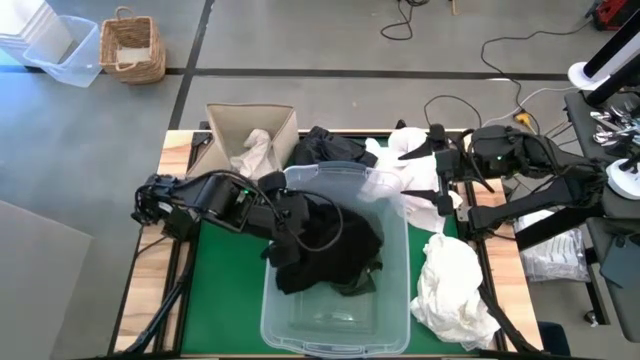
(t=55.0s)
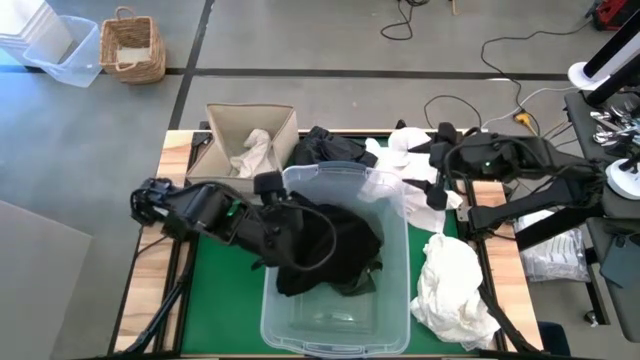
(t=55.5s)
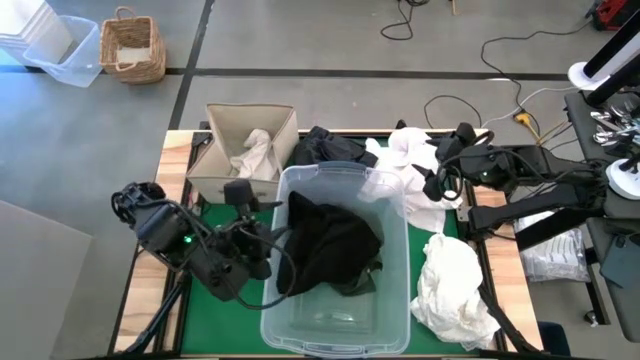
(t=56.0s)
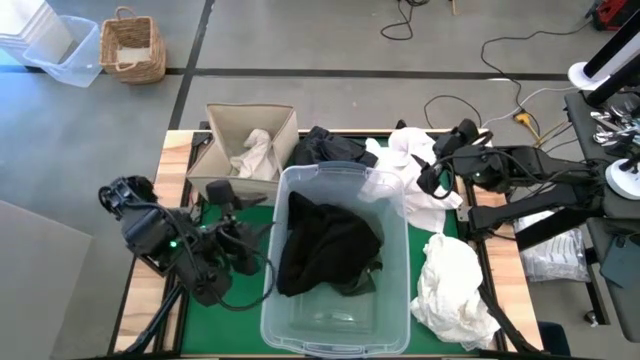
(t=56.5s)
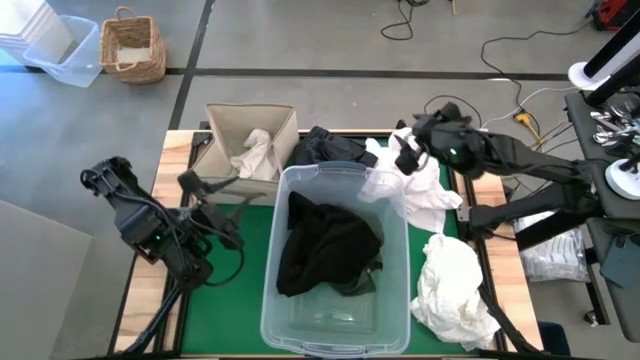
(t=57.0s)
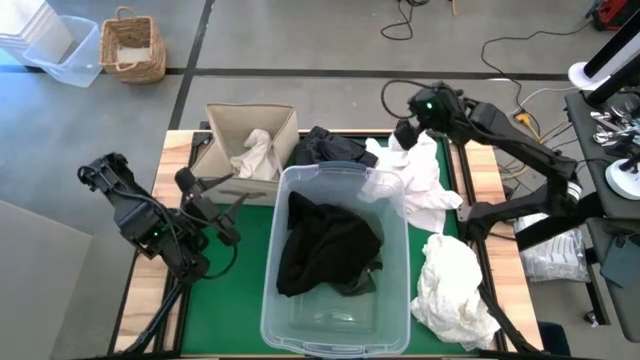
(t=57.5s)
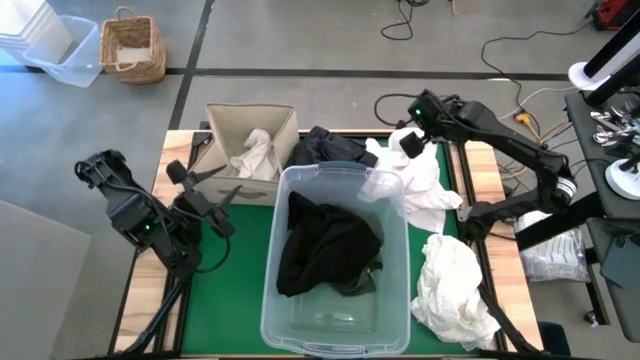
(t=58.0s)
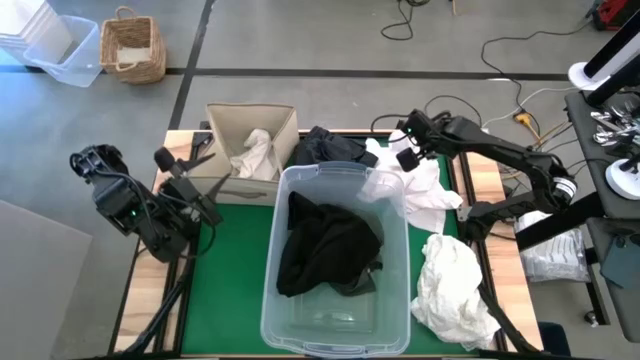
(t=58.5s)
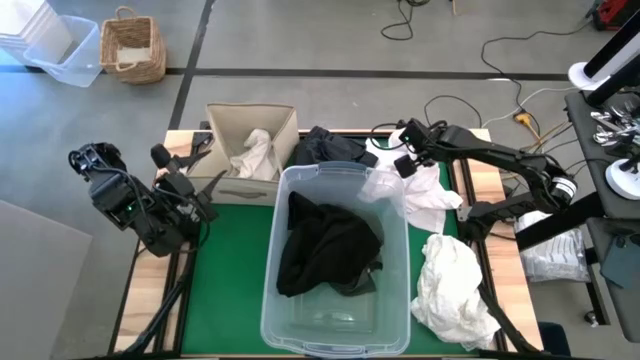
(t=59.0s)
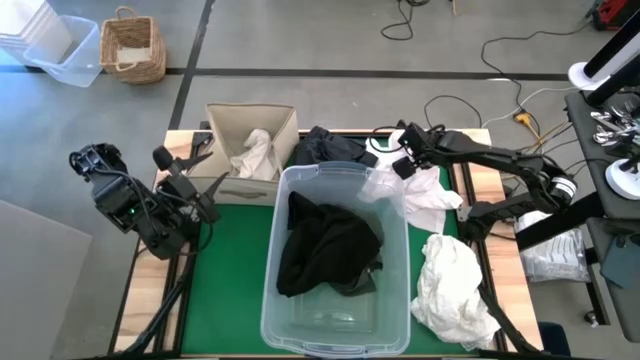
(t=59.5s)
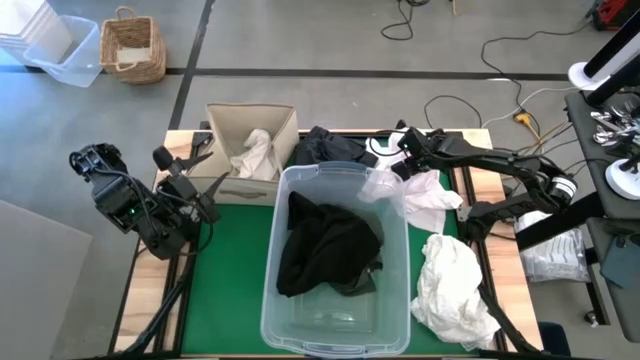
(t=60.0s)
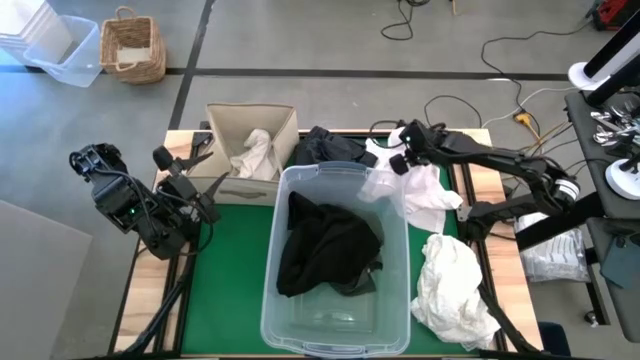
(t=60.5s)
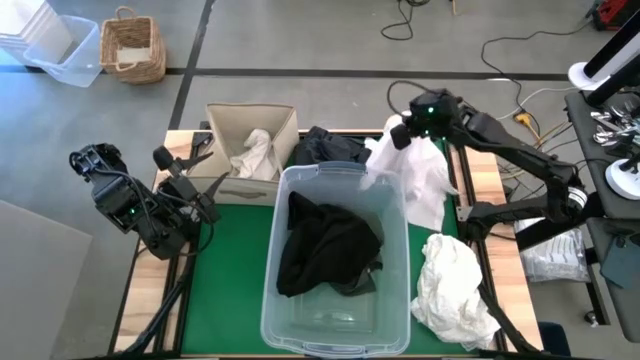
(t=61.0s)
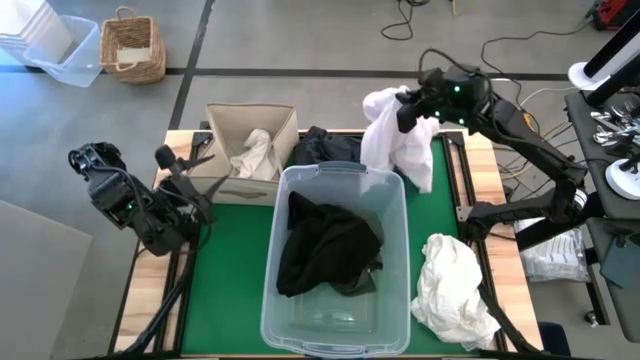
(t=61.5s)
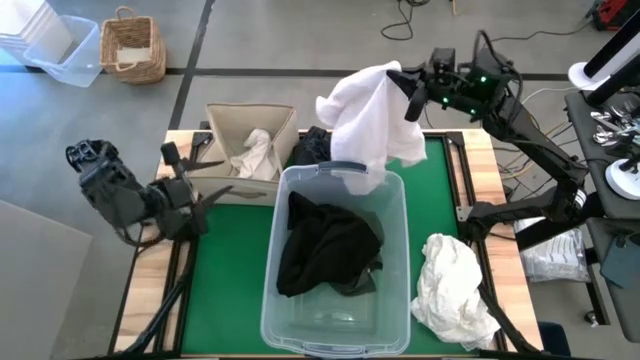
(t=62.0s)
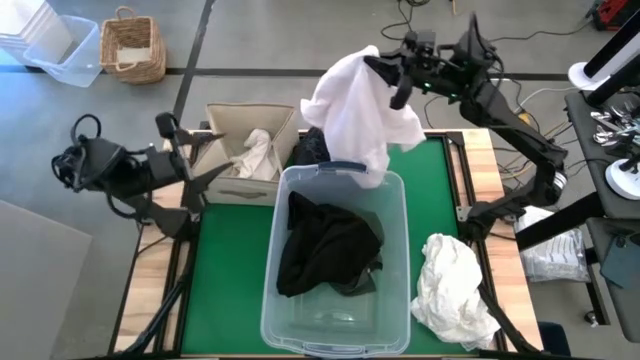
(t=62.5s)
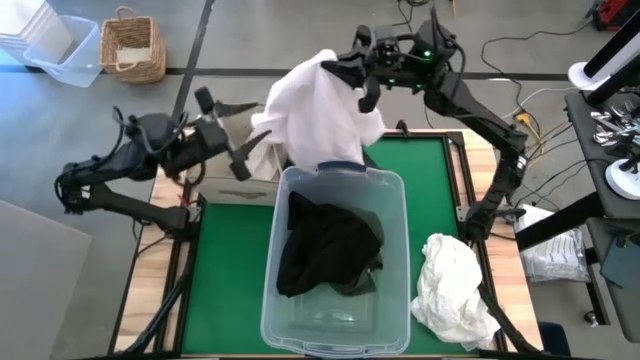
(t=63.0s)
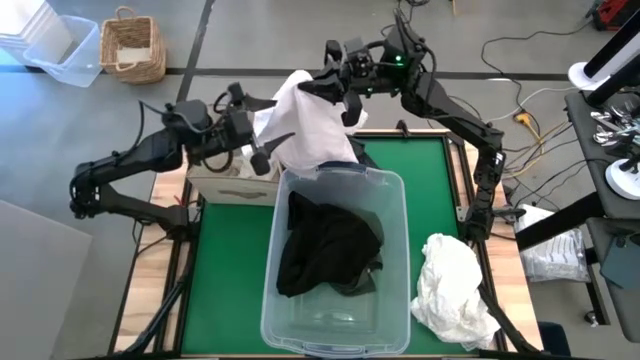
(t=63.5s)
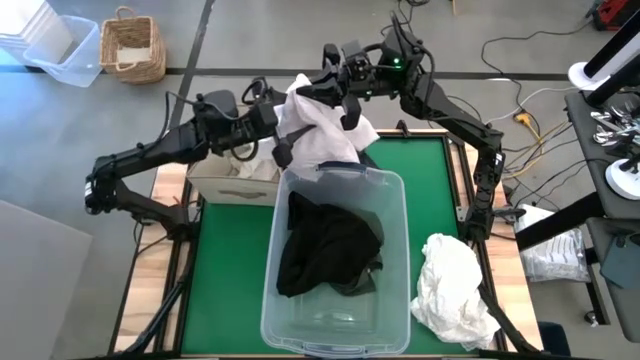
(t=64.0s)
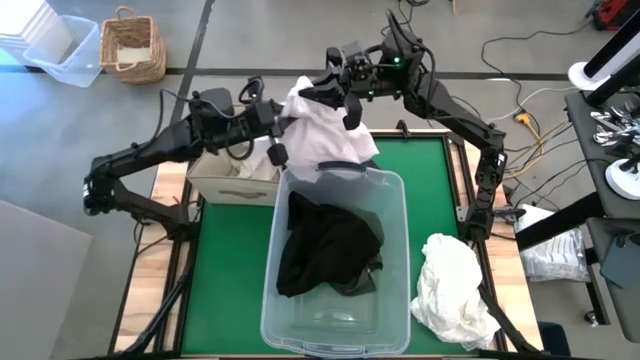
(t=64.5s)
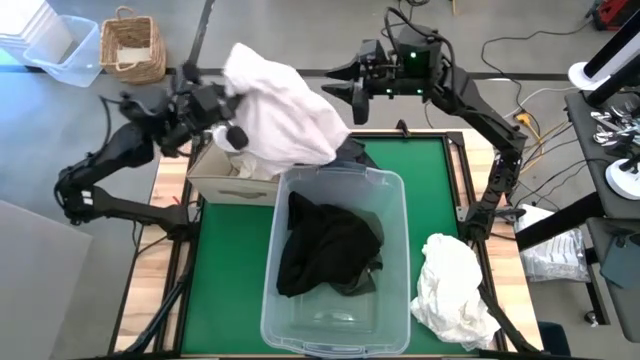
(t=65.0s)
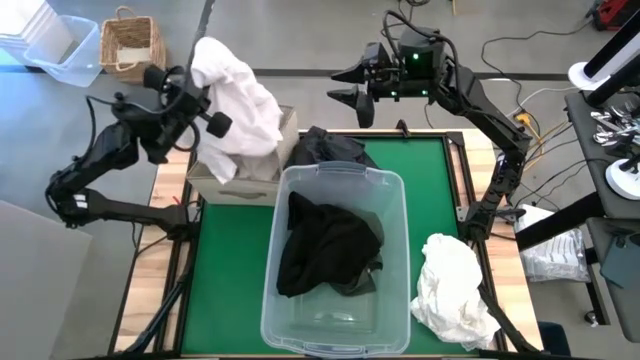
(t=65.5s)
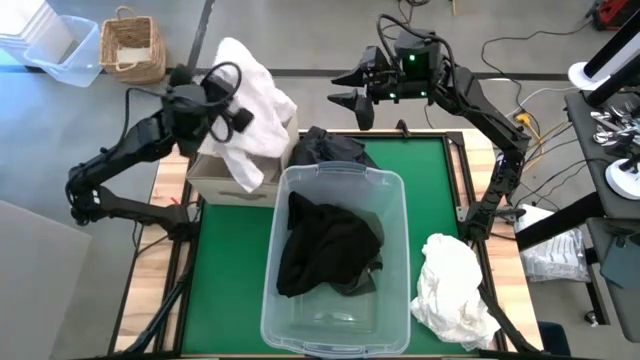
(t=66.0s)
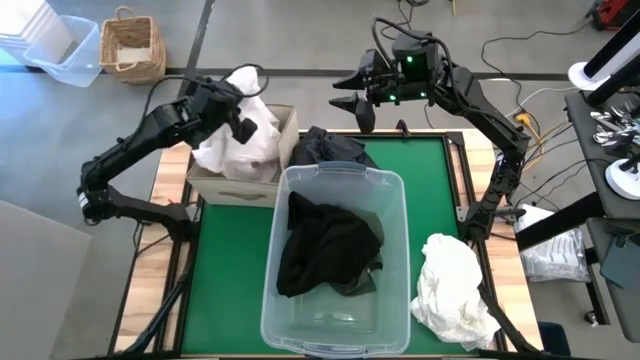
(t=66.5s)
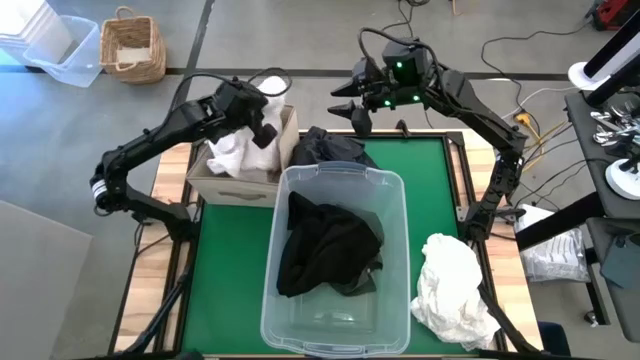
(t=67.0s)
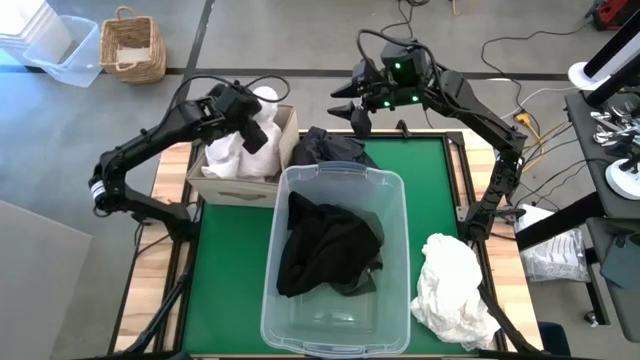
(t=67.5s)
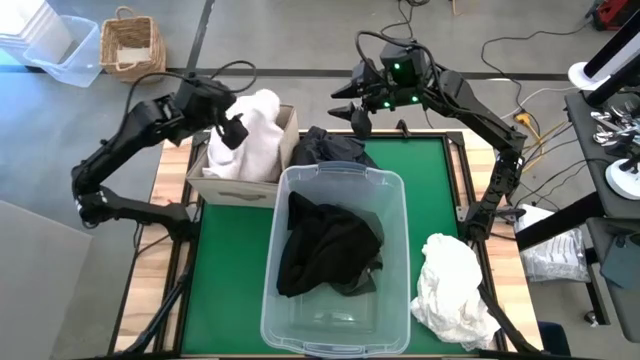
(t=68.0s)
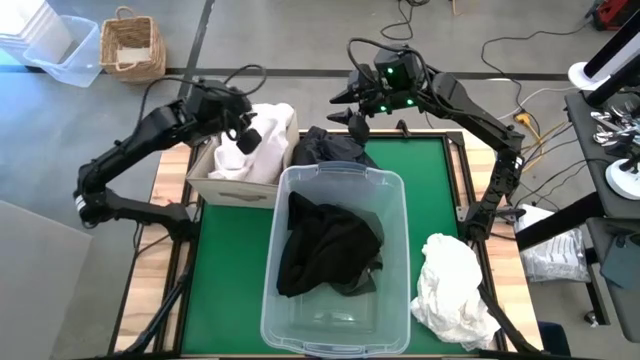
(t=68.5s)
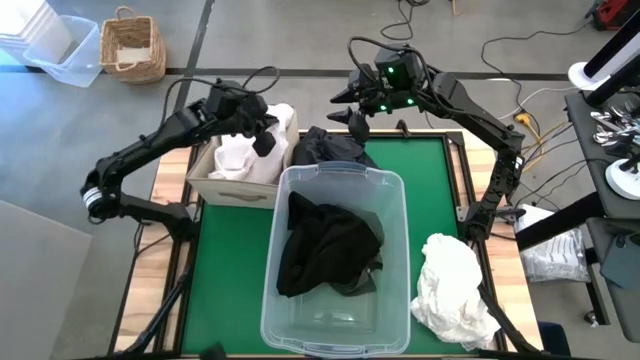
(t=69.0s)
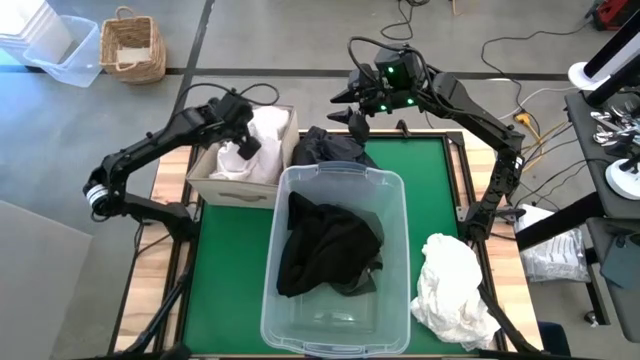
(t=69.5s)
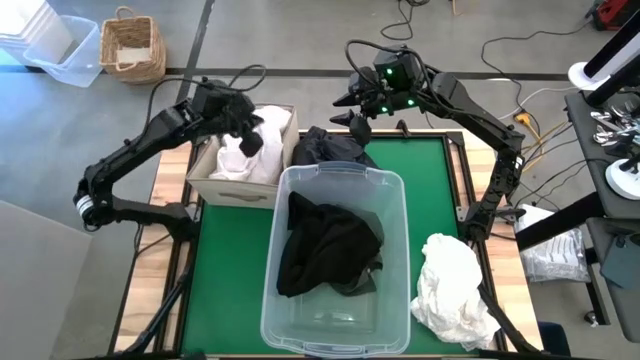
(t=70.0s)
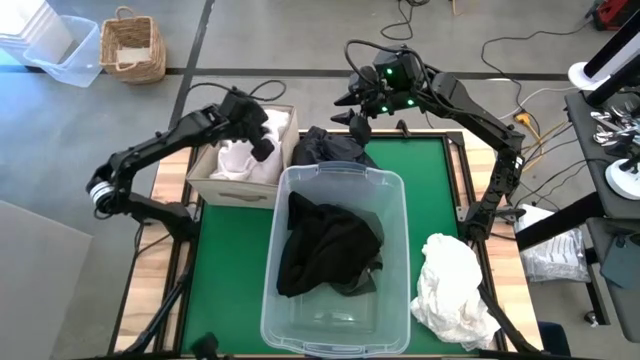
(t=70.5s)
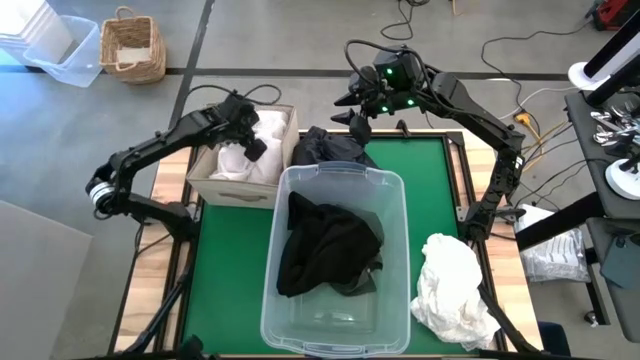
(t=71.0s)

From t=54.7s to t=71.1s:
Put the white polo shirt into the laundry organizer
